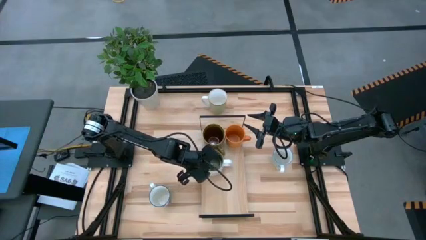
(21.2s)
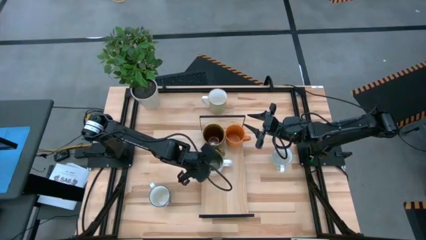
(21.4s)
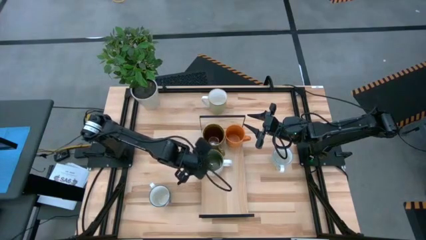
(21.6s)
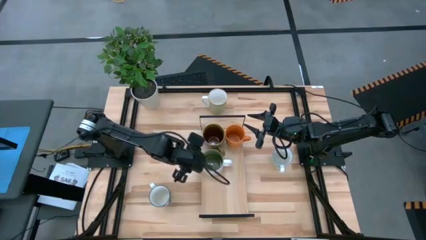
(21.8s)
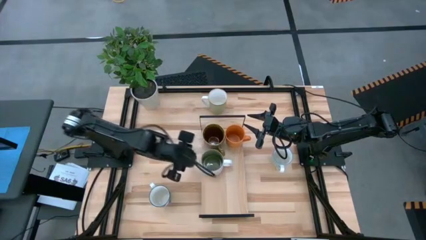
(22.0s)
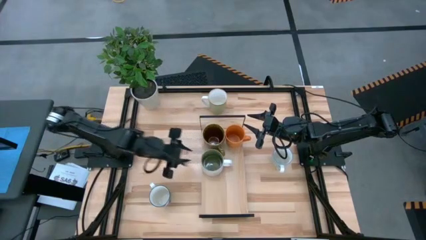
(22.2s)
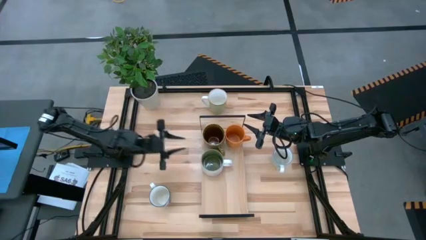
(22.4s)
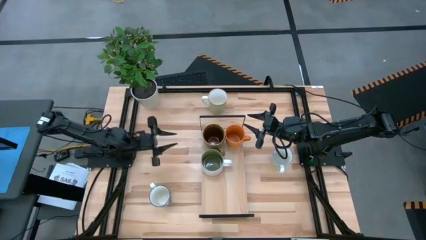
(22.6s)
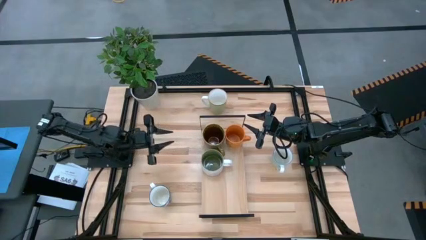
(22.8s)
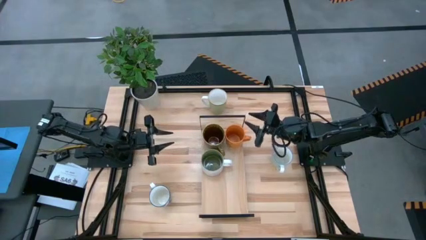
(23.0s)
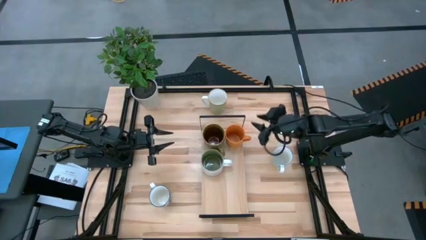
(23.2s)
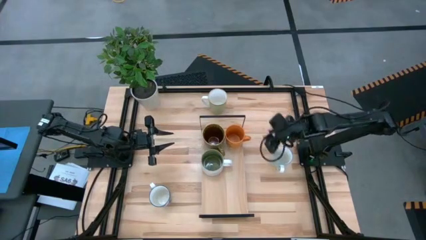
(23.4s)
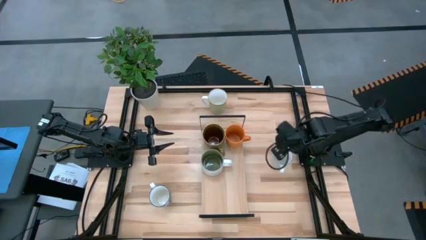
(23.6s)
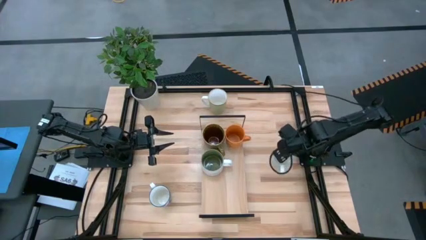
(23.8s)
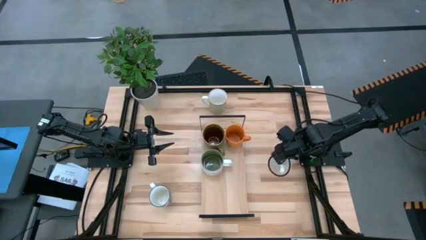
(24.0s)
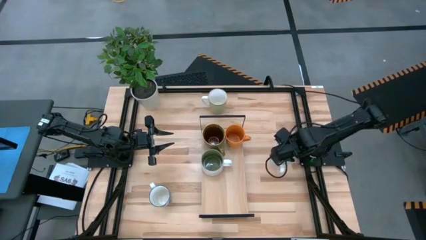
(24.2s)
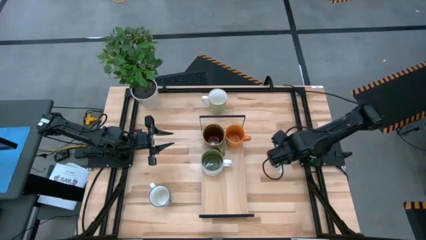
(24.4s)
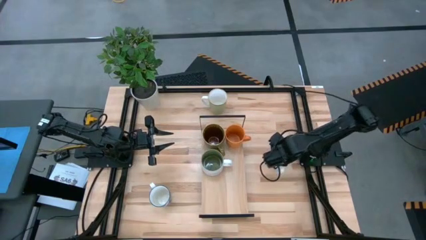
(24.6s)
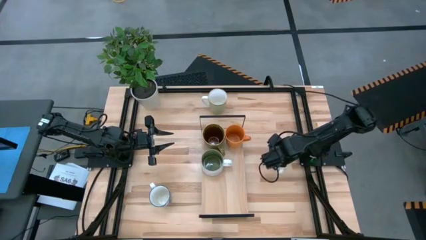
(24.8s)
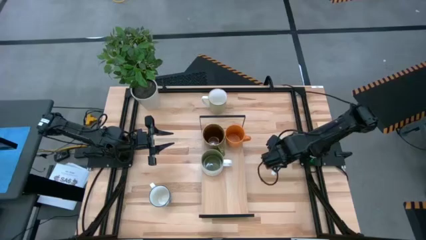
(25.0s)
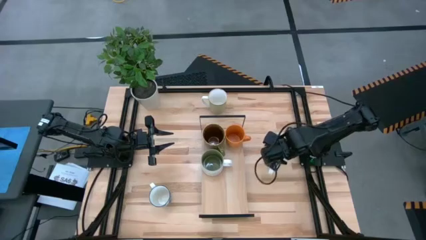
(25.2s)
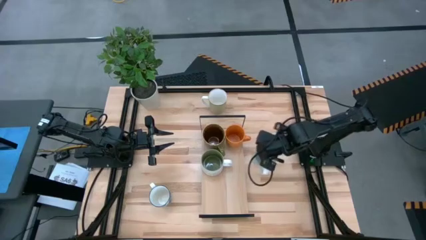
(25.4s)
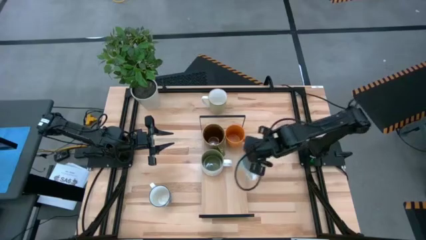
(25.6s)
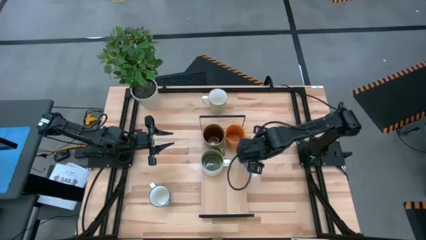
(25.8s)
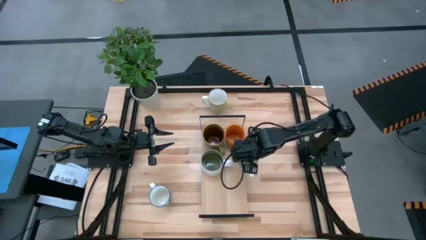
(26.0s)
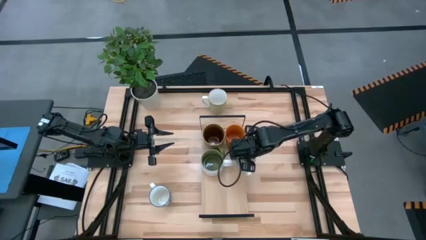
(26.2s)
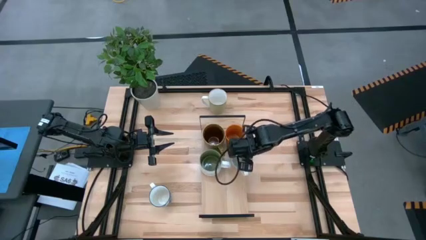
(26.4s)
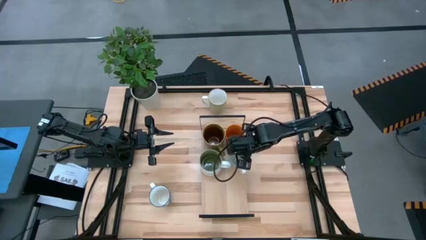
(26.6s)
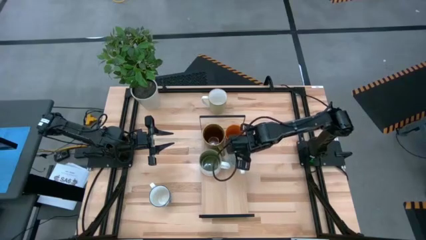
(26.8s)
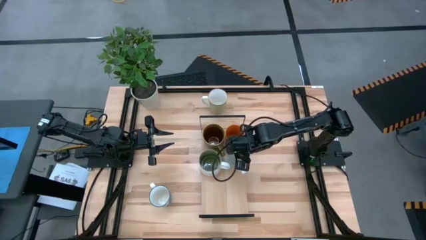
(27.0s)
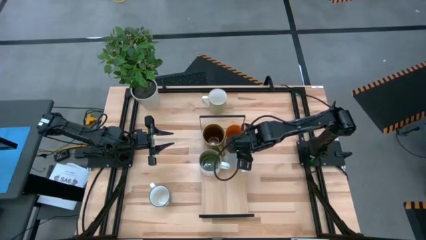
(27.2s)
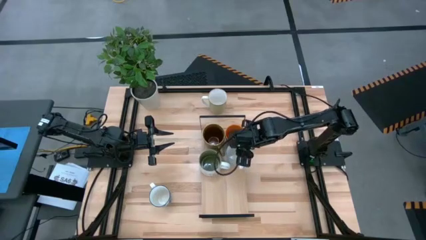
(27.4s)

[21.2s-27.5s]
Task: Place coffee mugs
Put the green patterned mug on the shelf

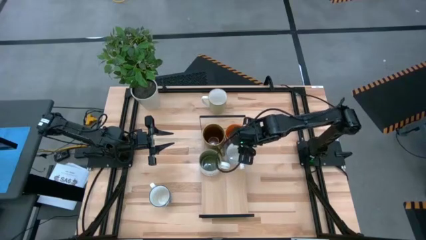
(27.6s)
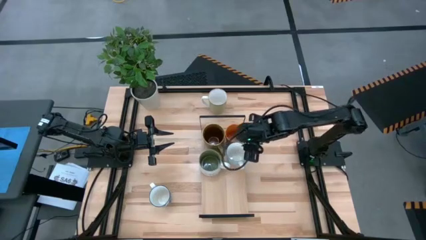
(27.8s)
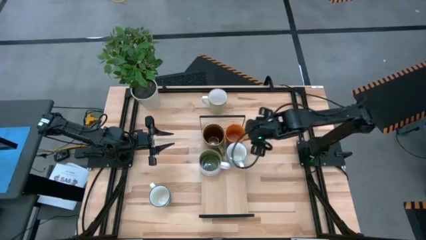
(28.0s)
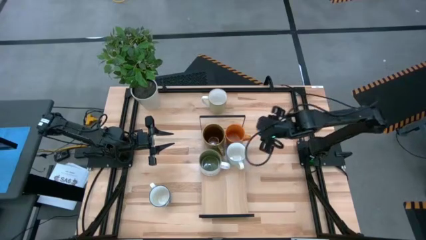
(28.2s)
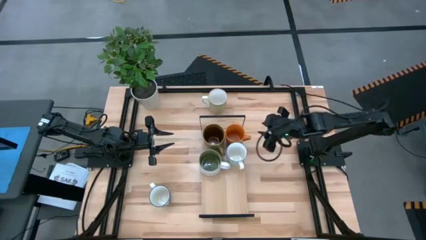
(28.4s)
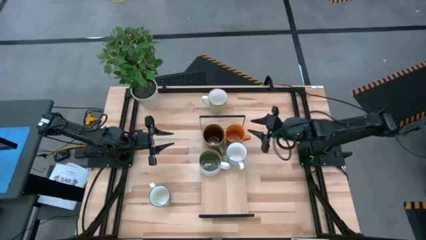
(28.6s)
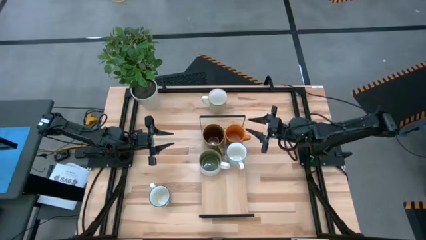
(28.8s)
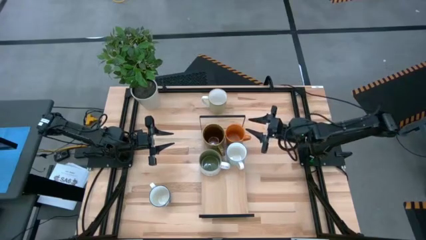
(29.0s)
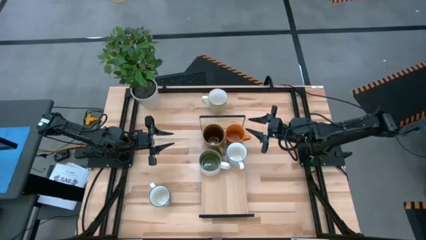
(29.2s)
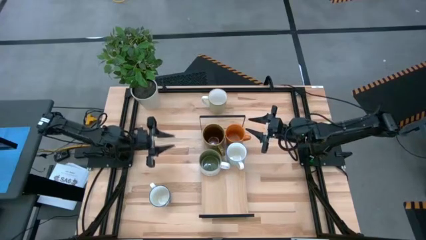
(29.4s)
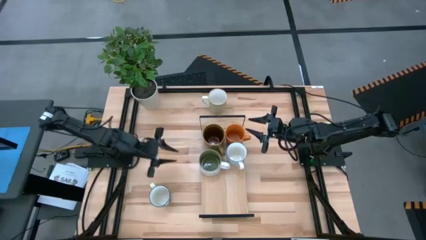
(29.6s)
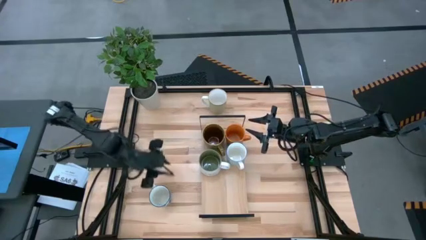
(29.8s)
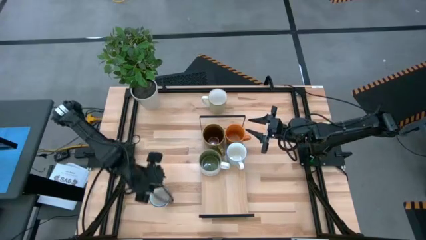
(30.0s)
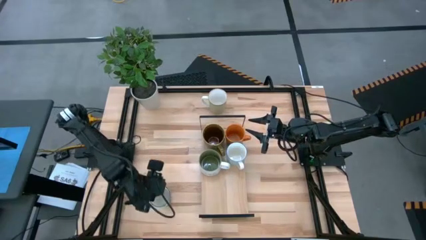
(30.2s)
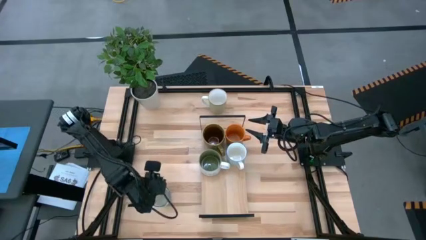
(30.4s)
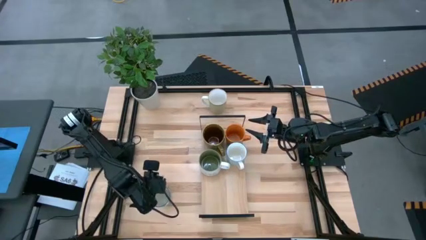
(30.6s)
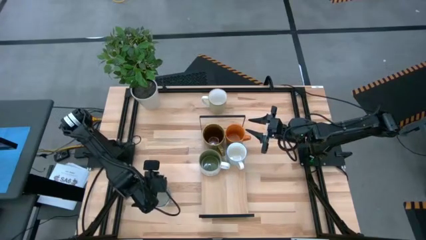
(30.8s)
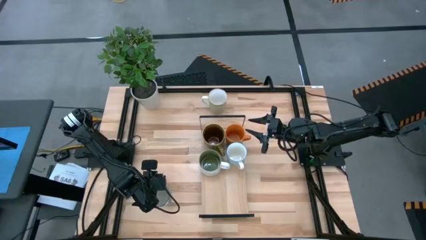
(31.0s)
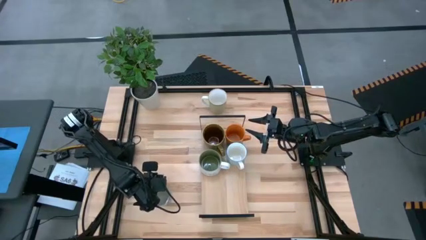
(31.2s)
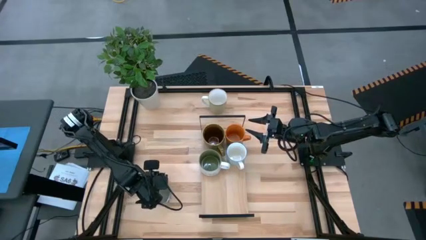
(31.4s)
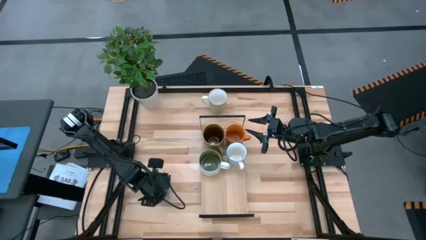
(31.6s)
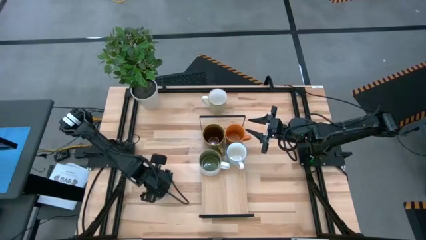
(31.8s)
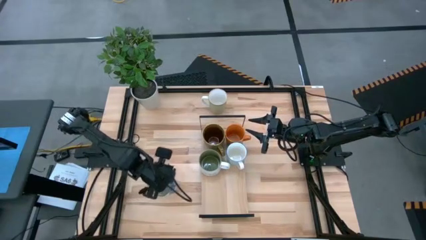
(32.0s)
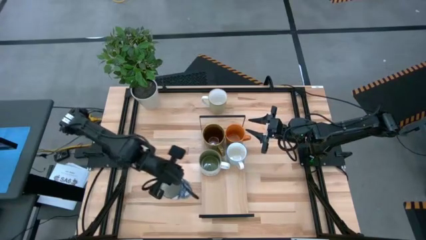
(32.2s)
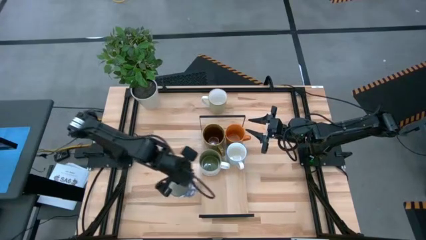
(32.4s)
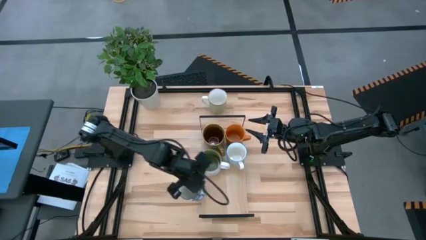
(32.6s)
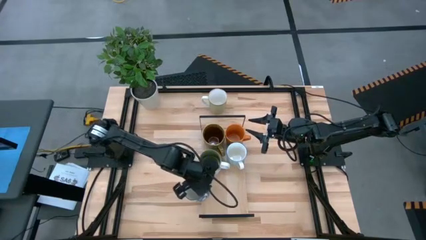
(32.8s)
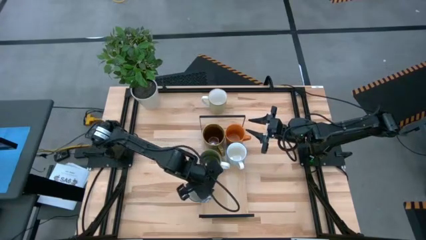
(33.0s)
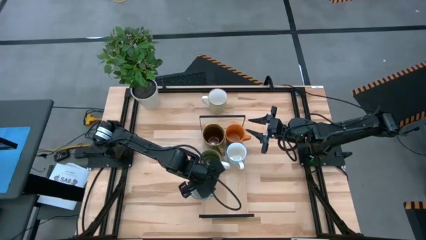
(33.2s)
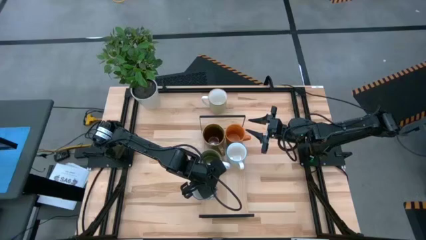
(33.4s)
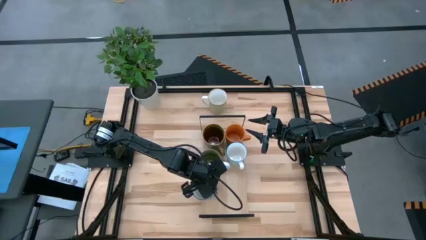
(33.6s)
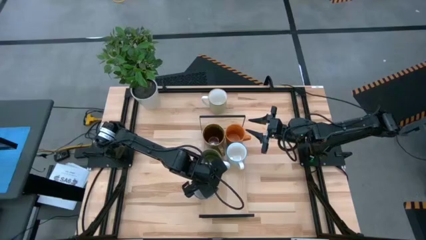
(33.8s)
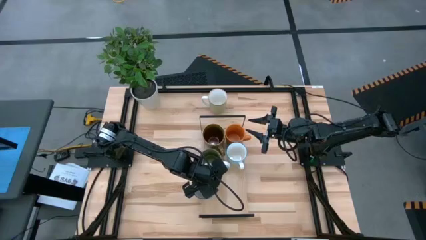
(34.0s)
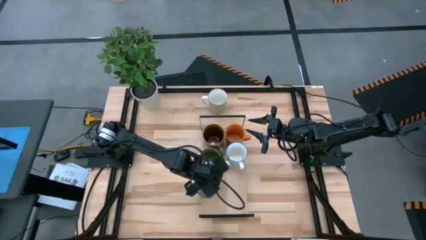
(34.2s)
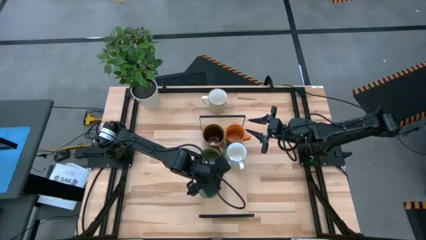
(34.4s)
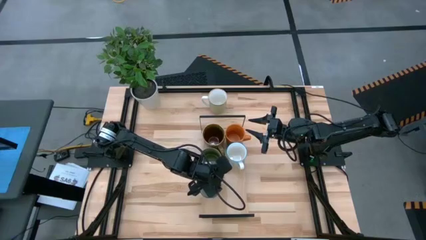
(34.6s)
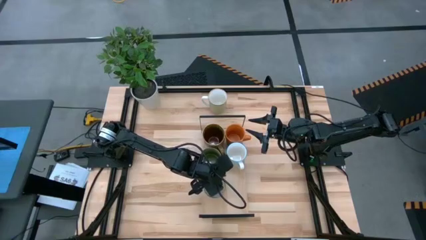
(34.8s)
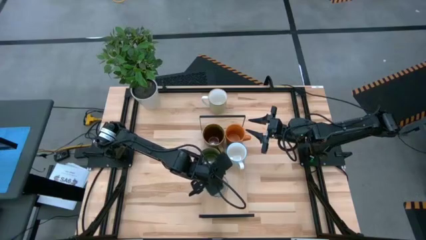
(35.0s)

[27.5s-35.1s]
Put the blue-white patterned mug on the shelf

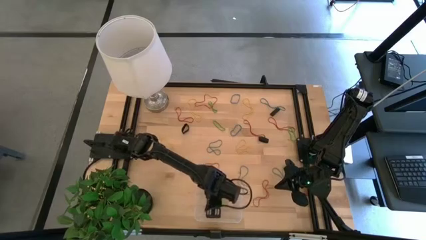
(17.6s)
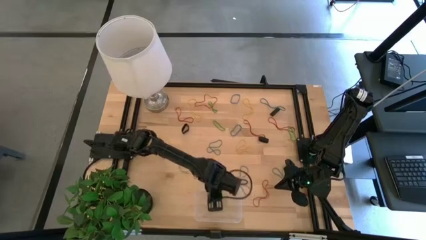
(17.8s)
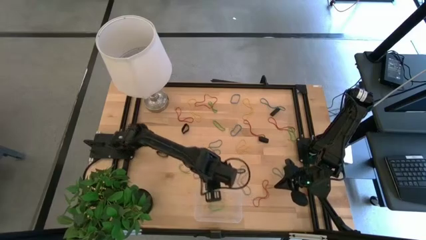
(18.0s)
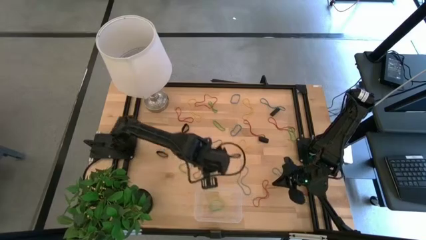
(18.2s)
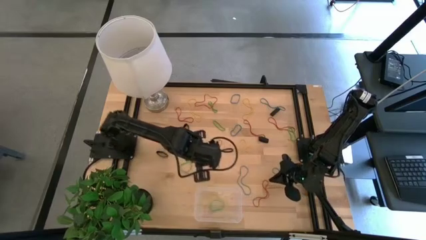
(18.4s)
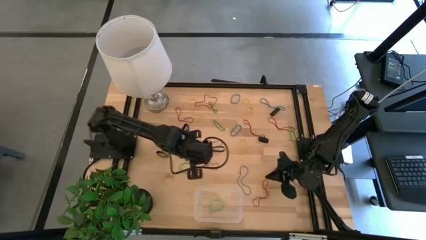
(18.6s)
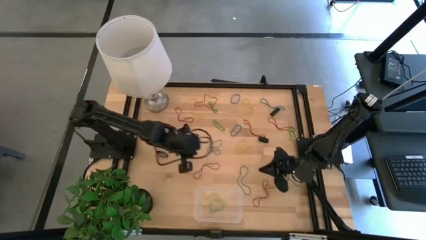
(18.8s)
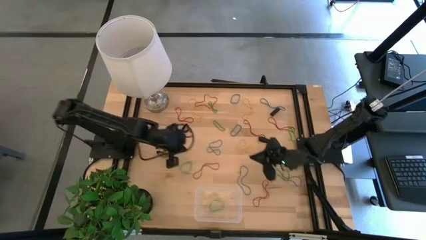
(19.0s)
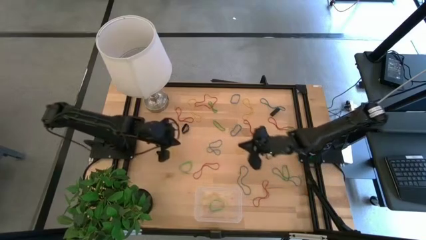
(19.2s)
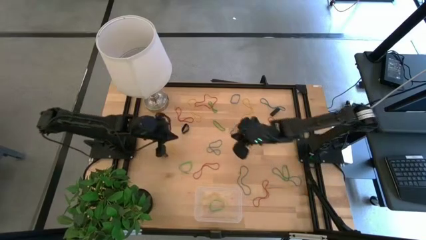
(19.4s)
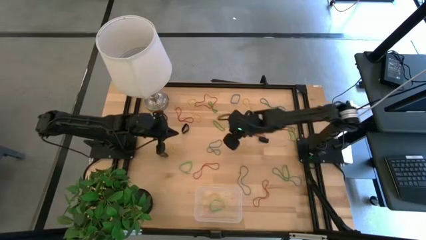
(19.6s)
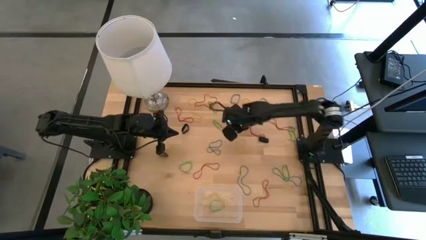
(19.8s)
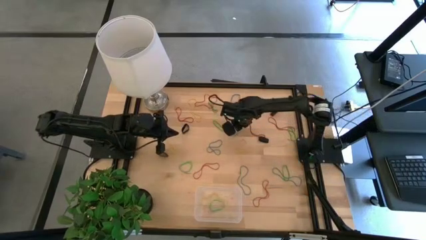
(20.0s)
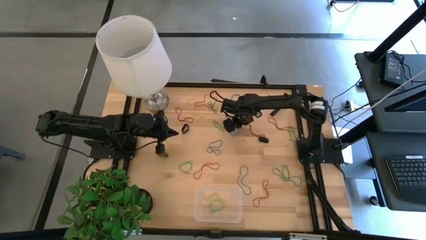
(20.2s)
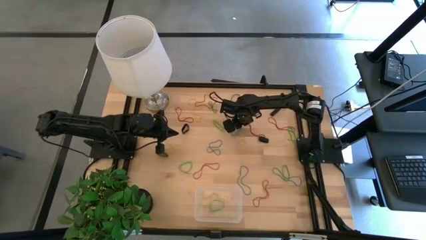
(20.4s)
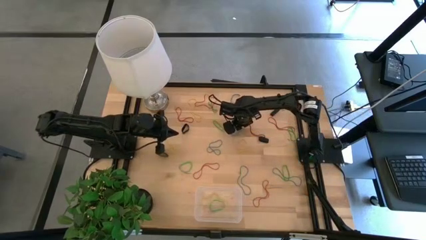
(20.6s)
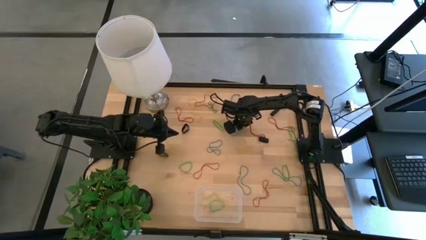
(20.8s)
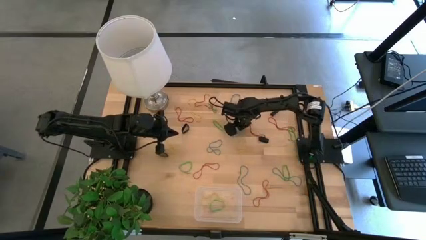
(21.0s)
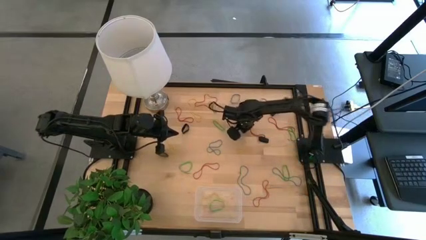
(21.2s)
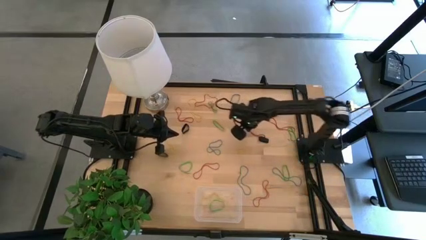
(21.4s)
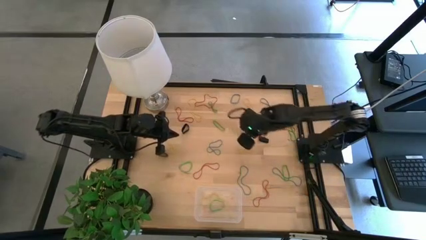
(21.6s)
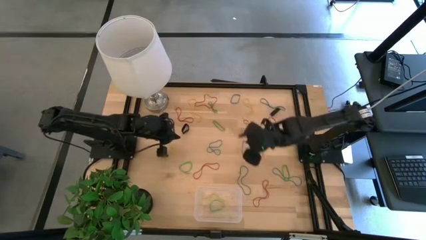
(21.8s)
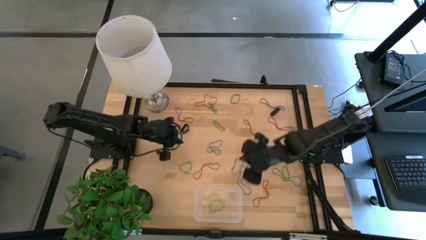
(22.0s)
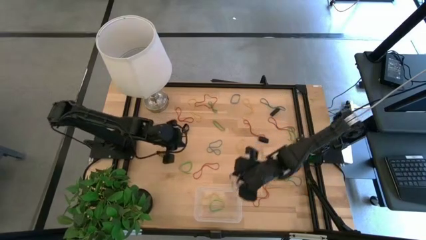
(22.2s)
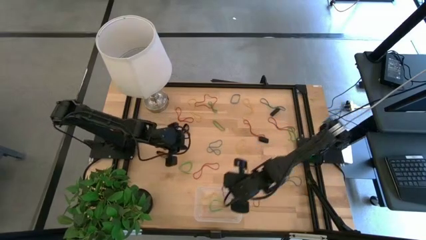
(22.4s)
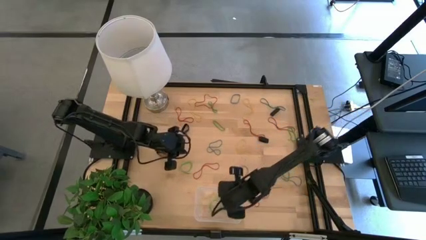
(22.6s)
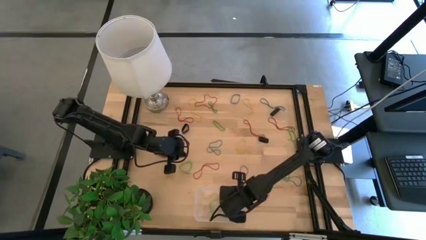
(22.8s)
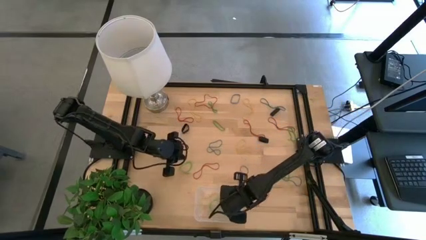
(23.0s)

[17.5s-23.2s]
Task: Pick and place rubber bands into bin
Put the blue rubber band into the transparent bin
